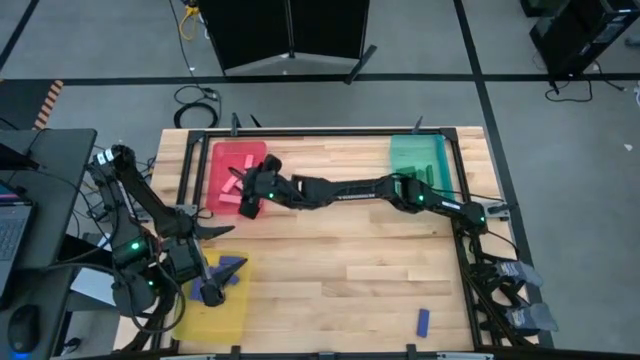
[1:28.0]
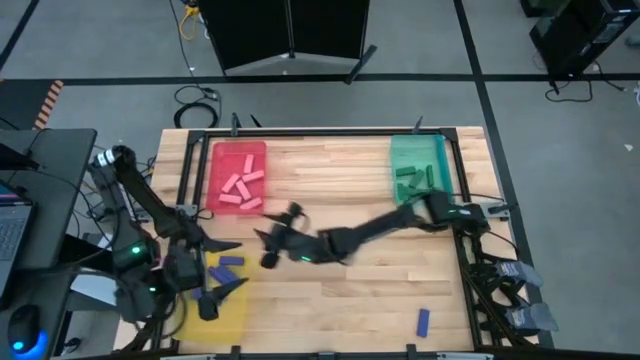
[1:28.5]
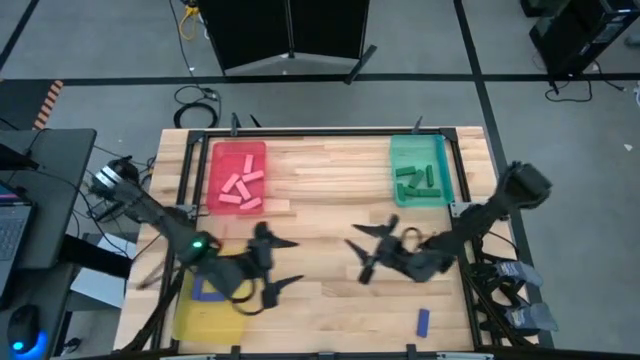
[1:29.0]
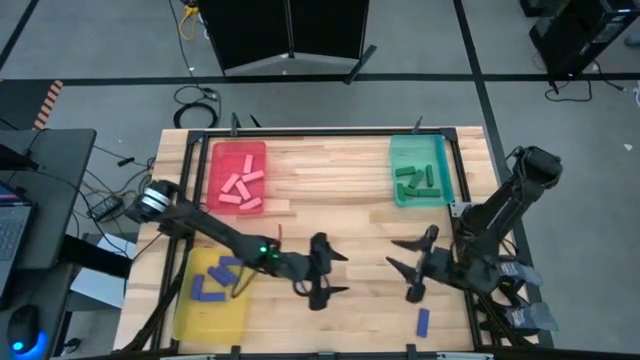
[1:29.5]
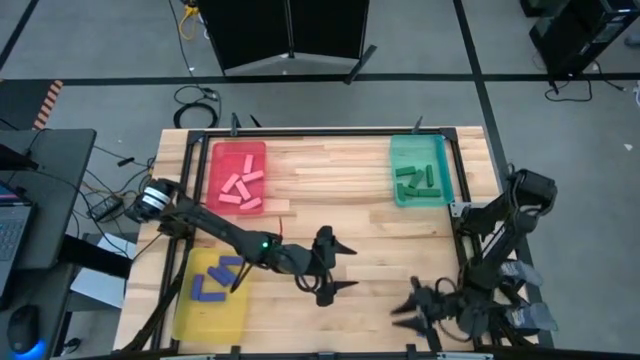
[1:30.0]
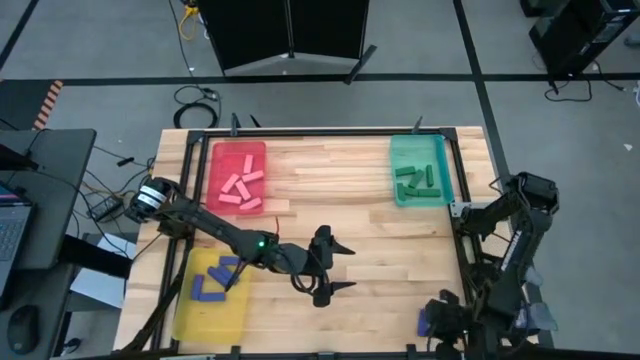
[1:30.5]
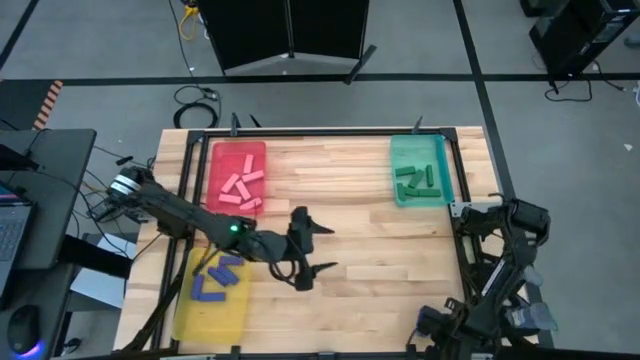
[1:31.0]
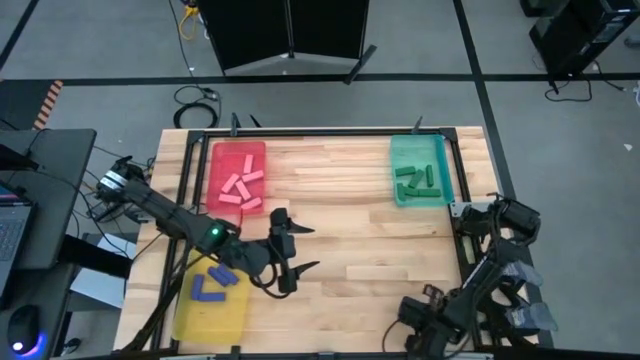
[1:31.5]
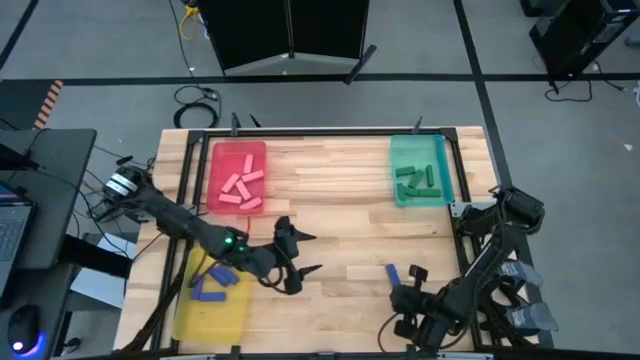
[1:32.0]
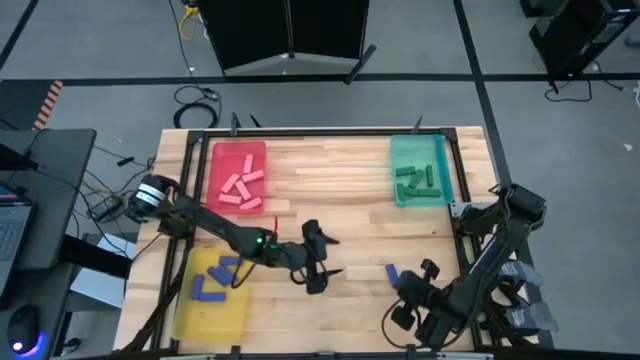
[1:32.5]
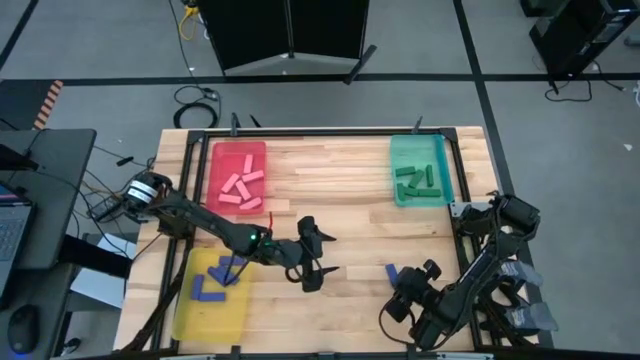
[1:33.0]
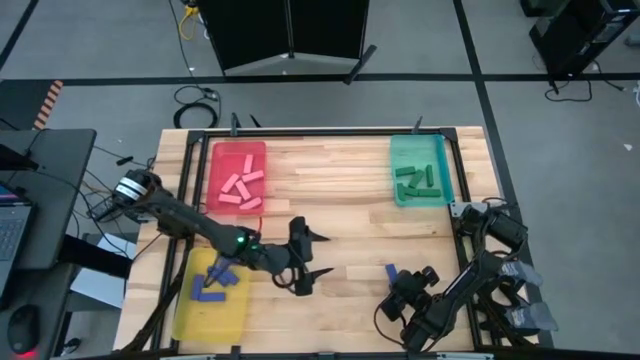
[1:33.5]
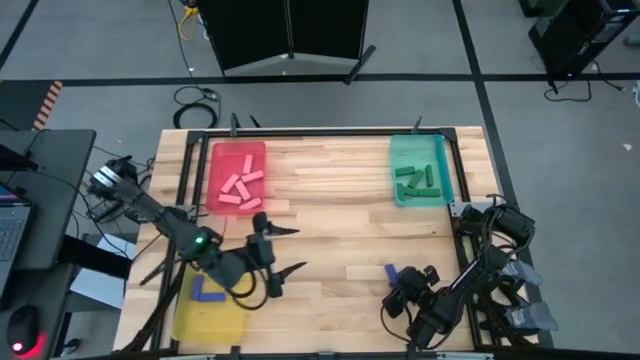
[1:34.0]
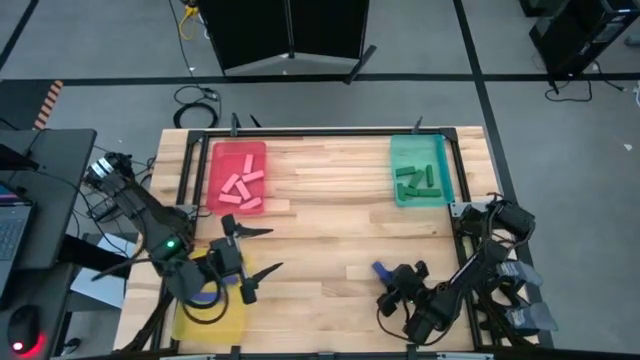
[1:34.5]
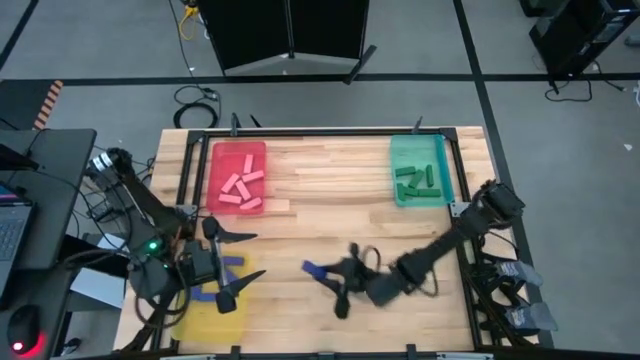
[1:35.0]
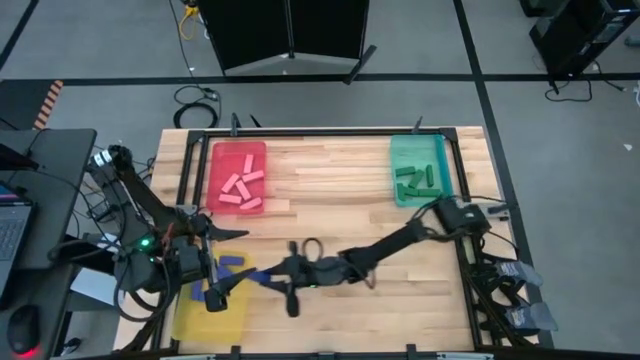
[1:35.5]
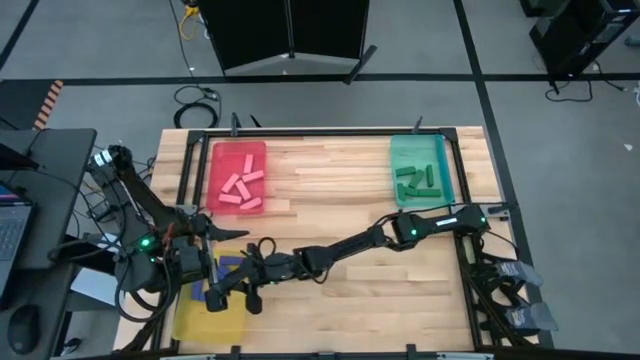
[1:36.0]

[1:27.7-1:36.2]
Task: Sort blocks
Put the blue block into the yellow bin

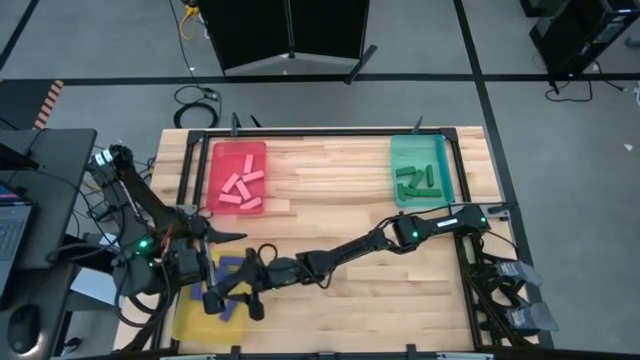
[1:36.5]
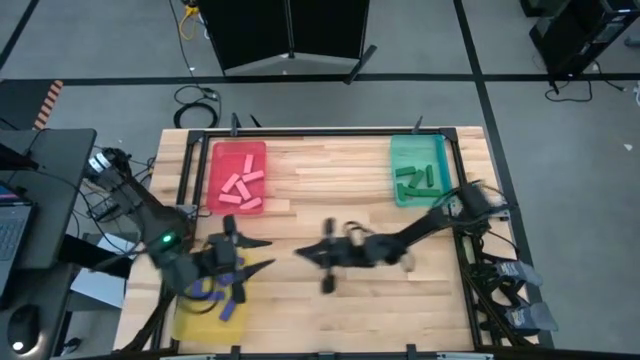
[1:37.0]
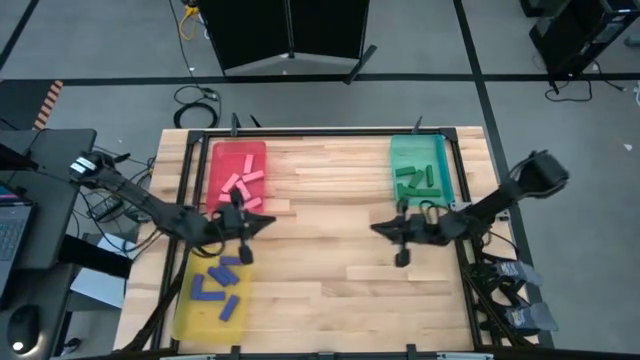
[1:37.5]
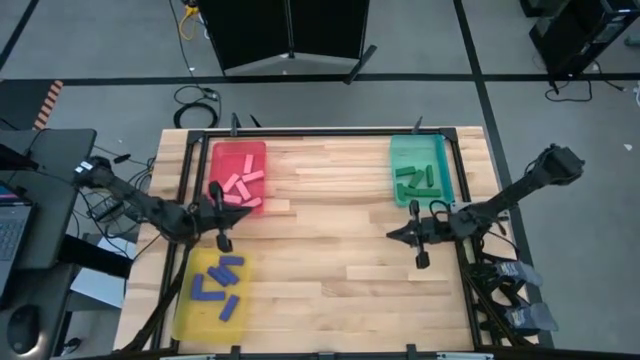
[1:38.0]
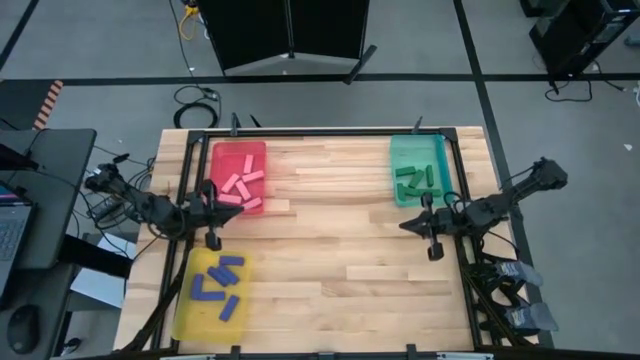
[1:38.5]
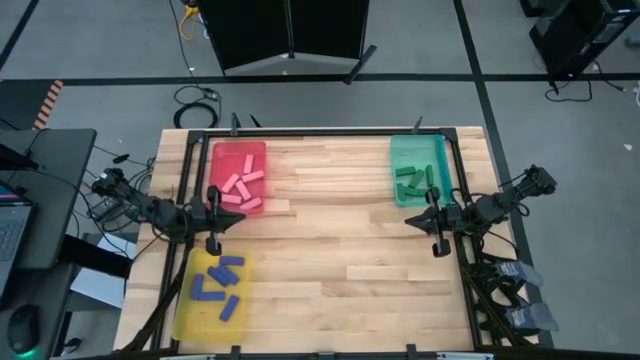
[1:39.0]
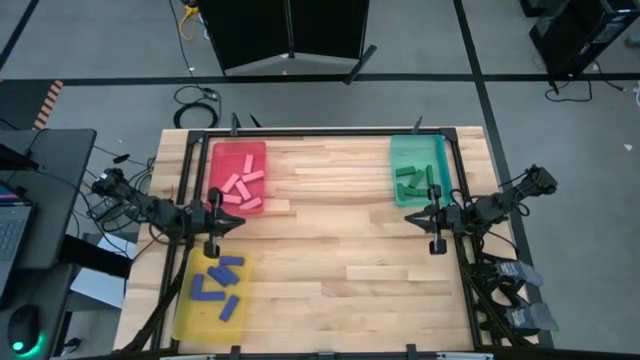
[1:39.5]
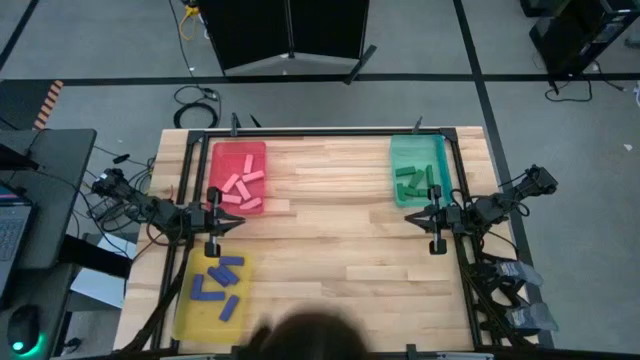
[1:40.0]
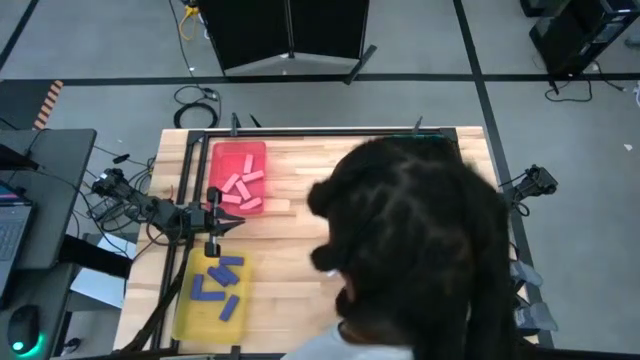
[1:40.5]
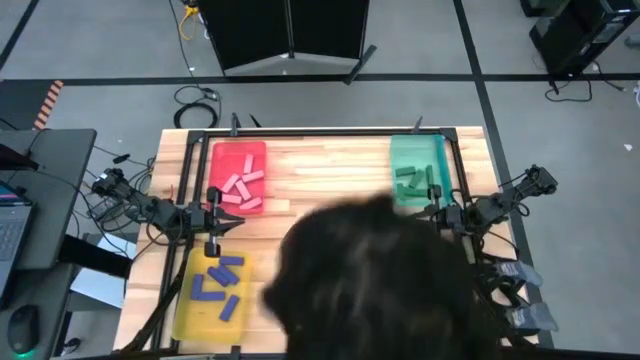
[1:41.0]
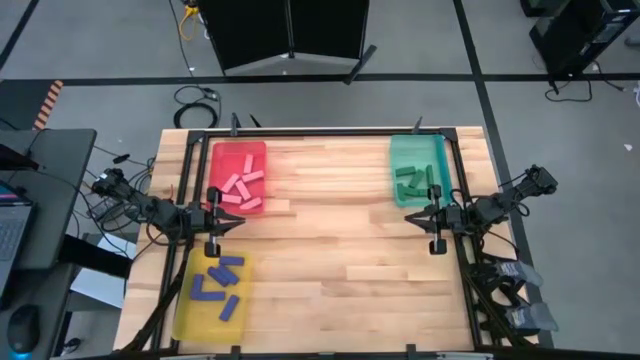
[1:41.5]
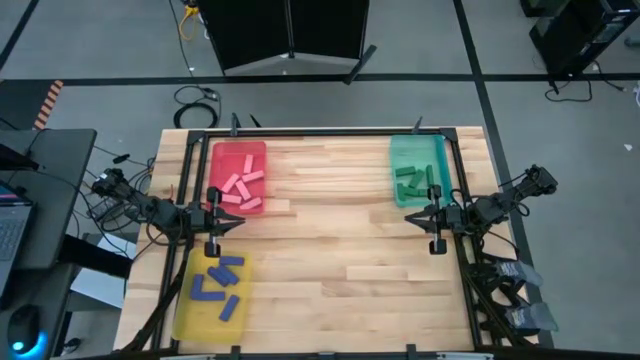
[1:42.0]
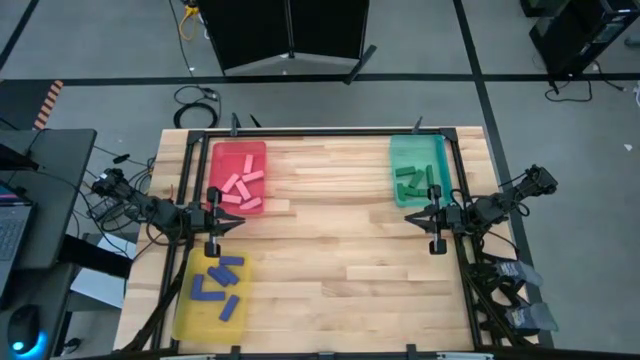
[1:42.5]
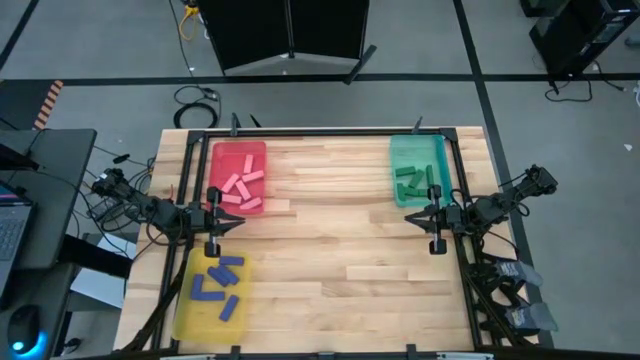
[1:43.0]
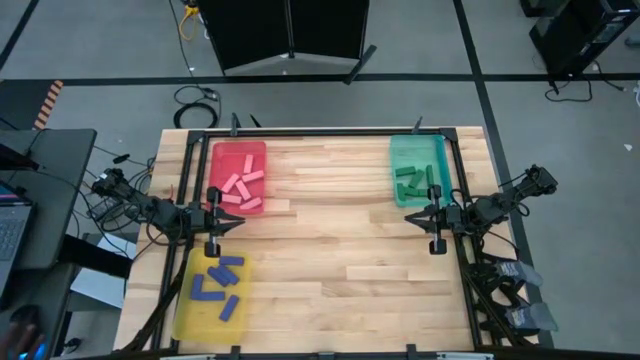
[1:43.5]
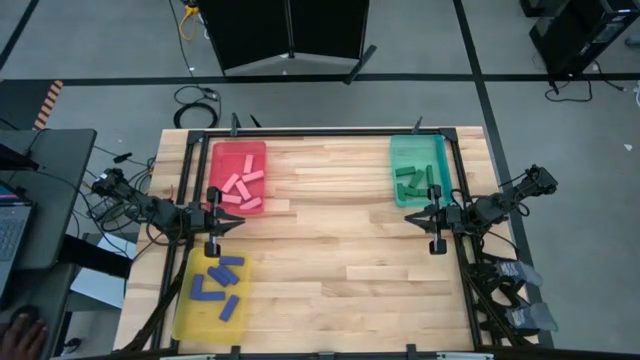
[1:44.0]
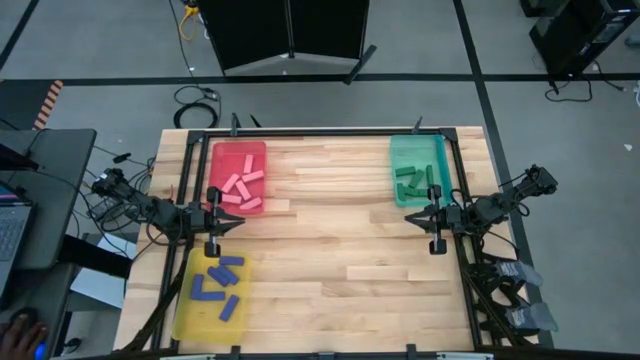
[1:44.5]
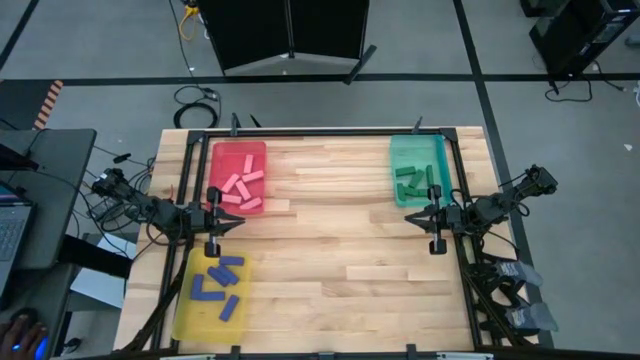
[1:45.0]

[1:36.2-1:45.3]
Return to Home Position

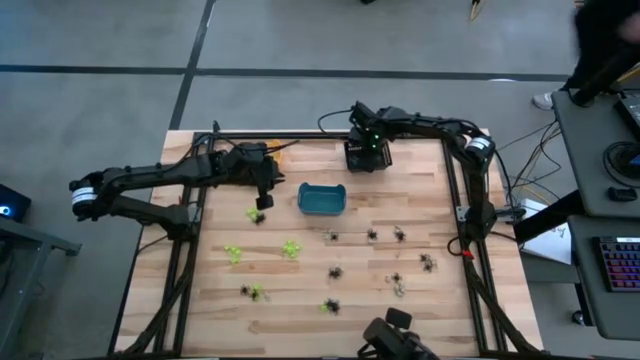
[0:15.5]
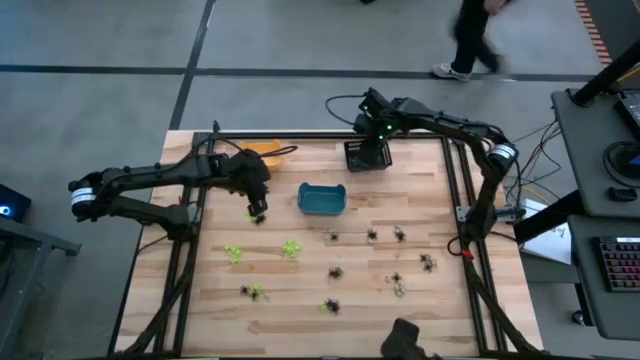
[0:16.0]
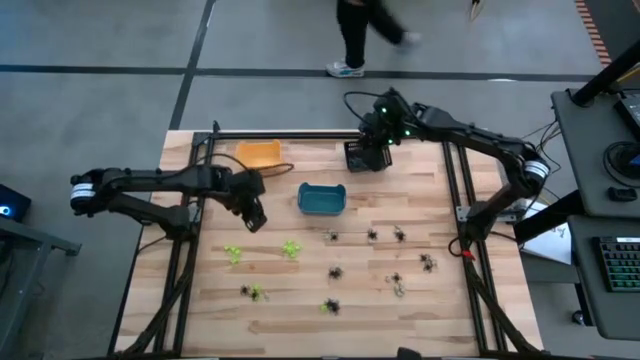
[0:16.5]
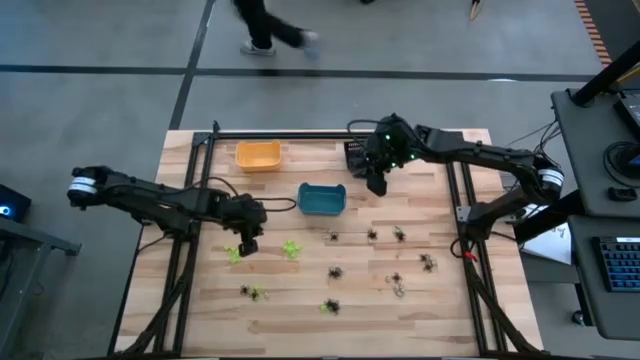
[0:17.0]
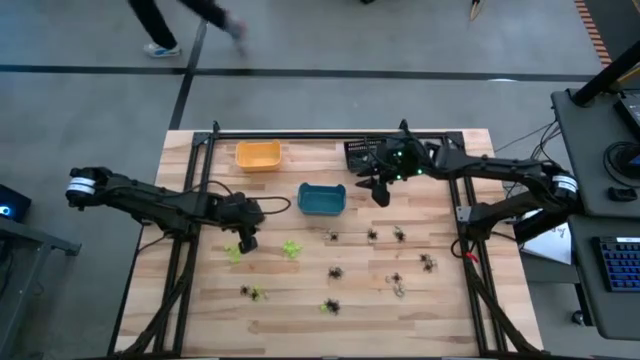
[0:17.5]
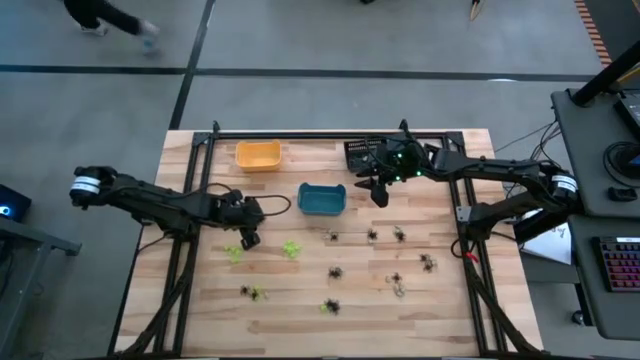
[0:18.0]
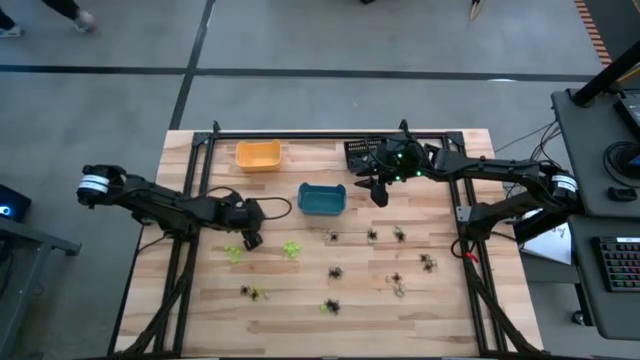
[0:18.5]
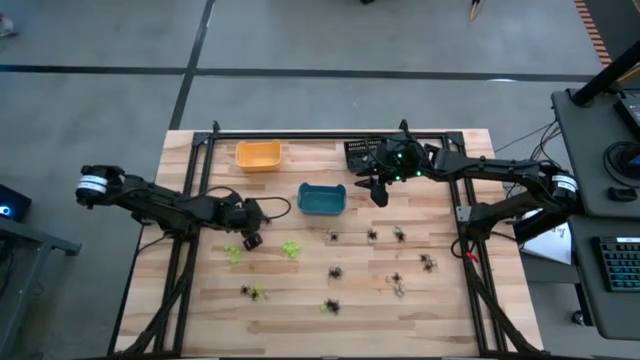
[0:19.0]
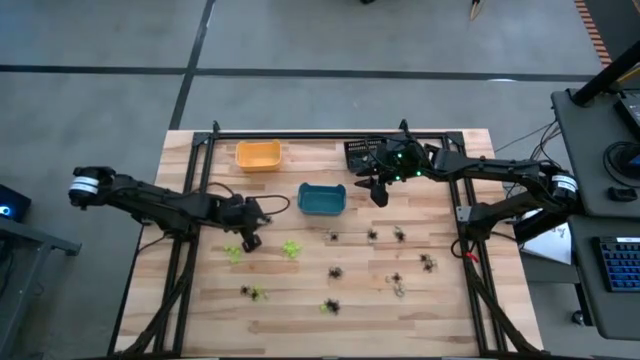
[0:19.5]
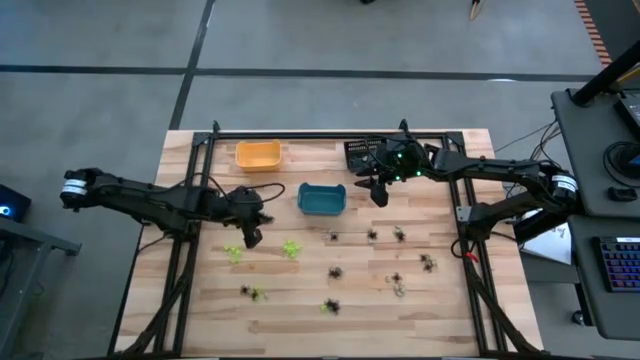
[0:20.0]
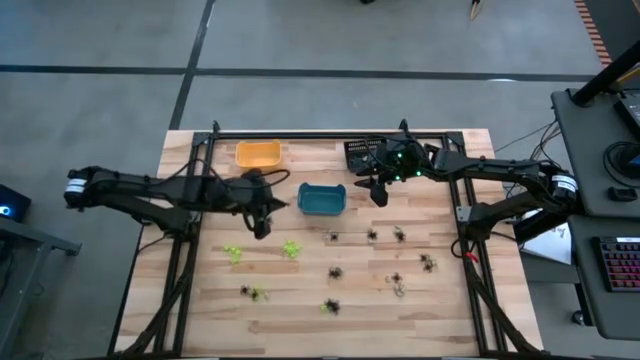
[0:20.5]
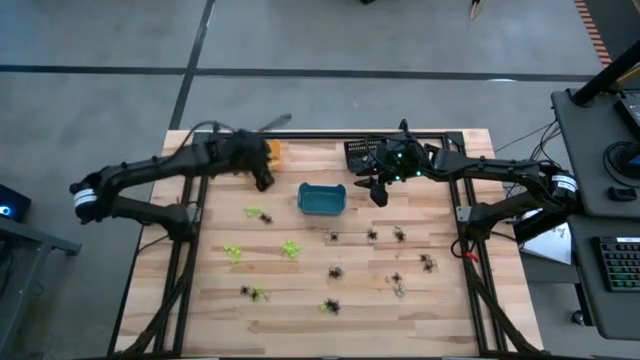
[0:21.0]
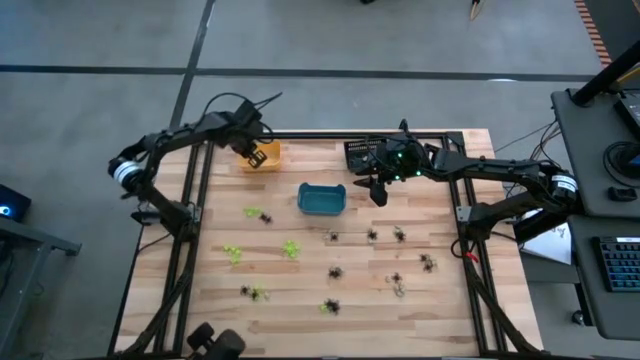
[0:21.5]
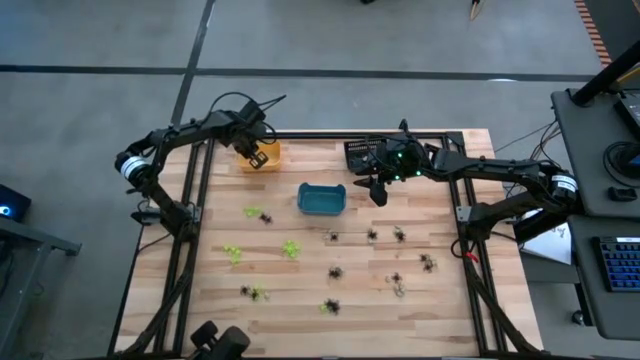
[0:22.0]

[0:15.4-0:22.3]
Task: Sort Halloween decoration
Put the black spider toy into the yellow bin
